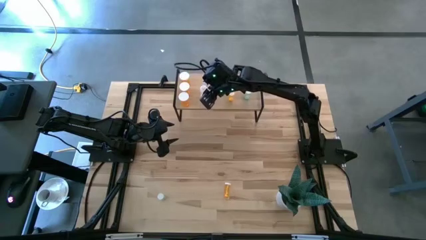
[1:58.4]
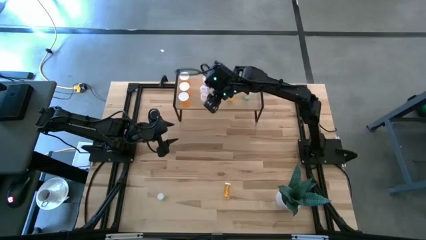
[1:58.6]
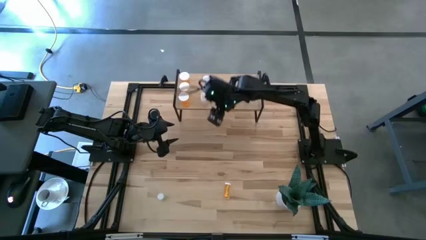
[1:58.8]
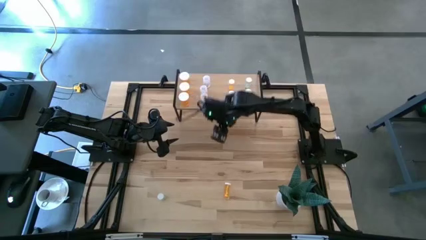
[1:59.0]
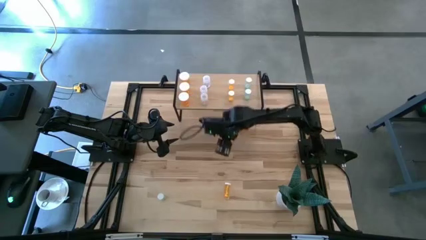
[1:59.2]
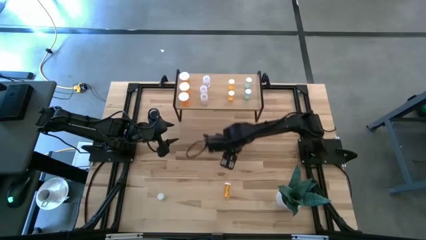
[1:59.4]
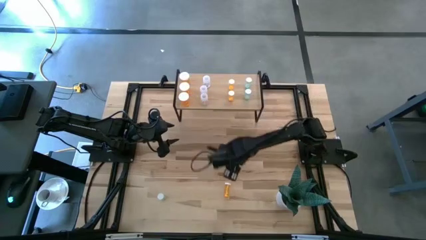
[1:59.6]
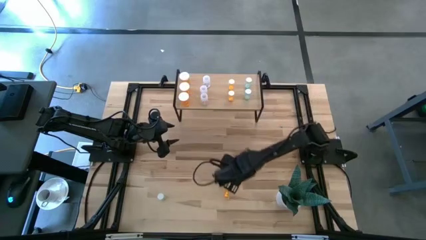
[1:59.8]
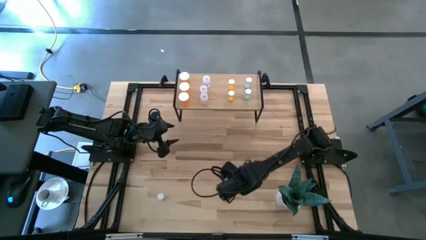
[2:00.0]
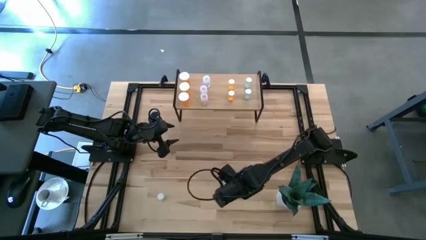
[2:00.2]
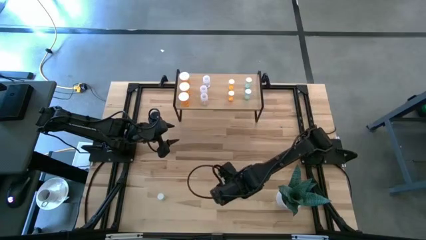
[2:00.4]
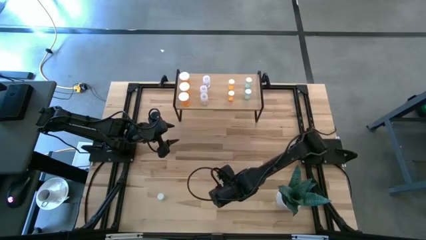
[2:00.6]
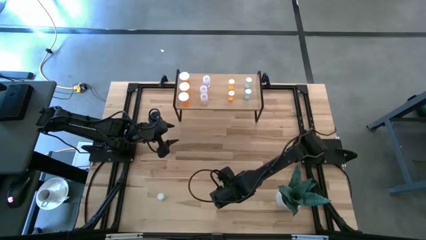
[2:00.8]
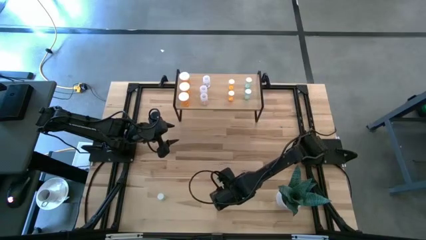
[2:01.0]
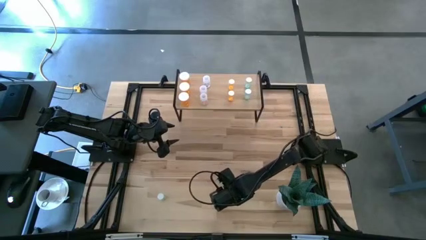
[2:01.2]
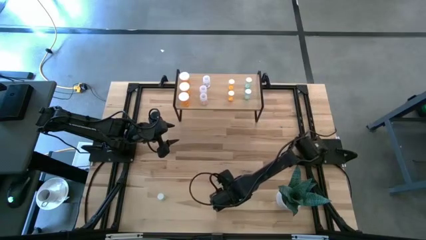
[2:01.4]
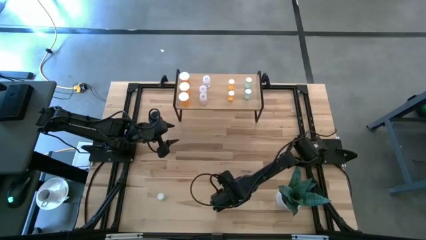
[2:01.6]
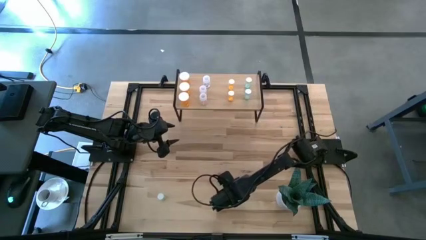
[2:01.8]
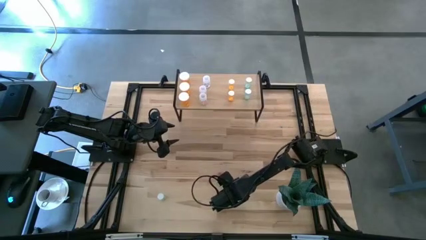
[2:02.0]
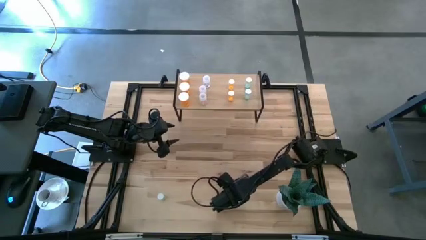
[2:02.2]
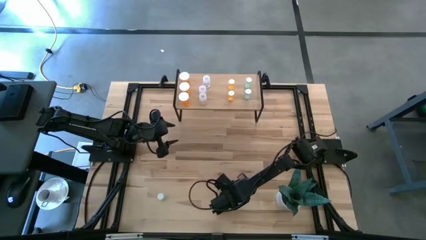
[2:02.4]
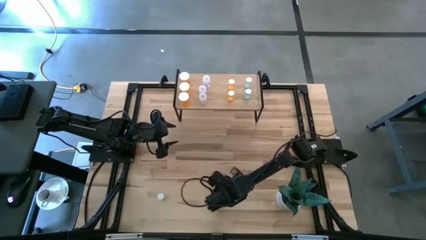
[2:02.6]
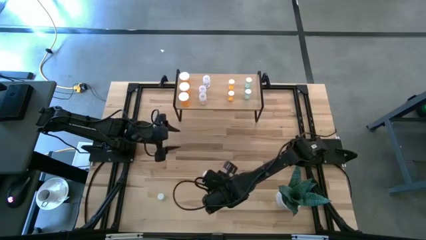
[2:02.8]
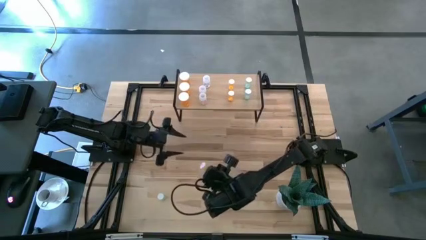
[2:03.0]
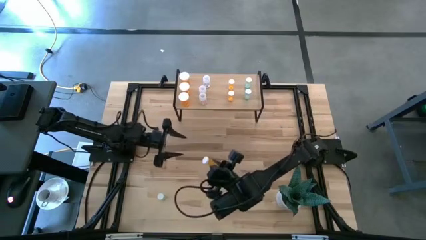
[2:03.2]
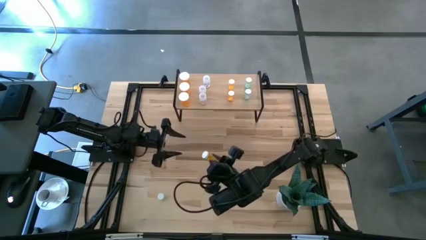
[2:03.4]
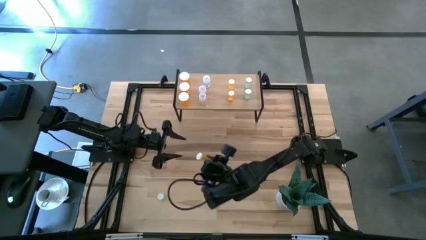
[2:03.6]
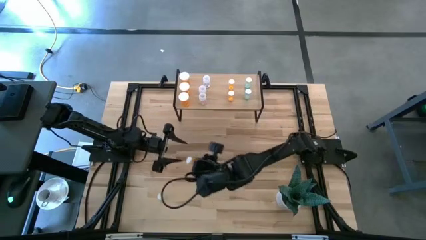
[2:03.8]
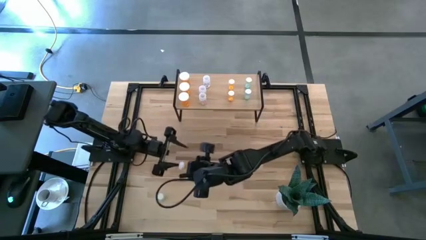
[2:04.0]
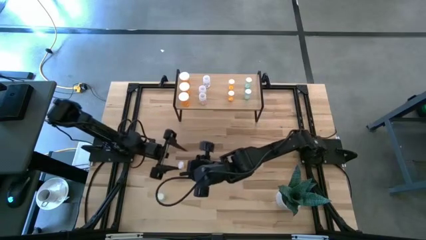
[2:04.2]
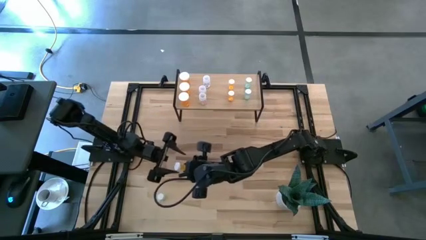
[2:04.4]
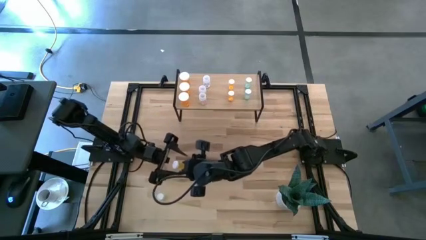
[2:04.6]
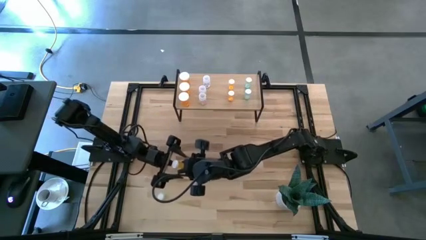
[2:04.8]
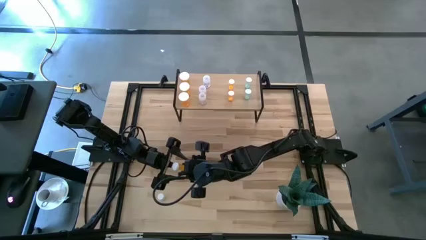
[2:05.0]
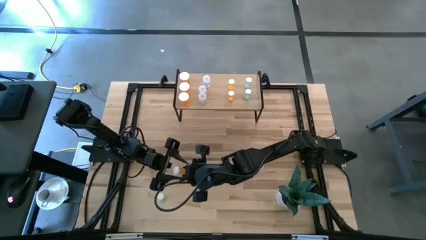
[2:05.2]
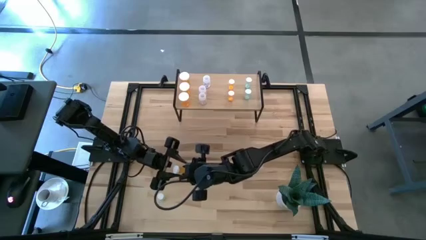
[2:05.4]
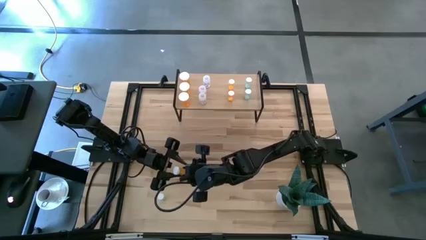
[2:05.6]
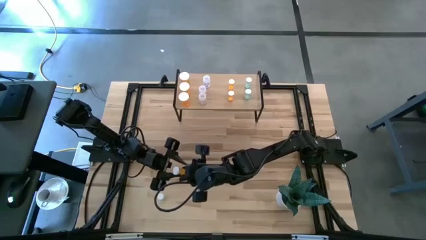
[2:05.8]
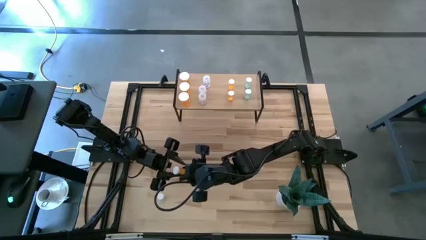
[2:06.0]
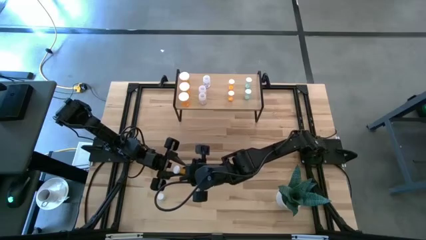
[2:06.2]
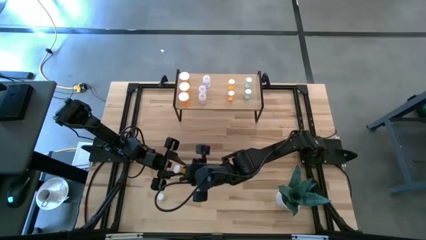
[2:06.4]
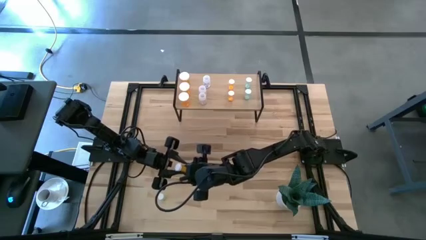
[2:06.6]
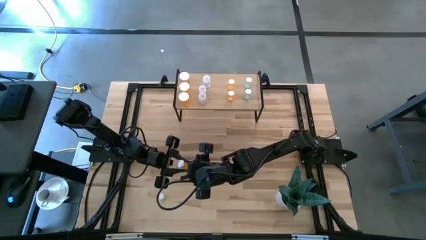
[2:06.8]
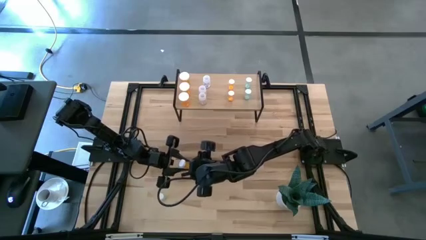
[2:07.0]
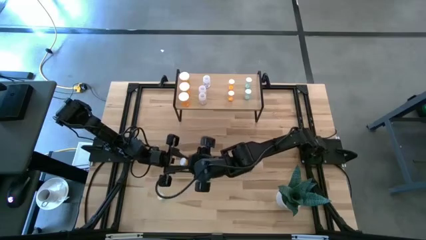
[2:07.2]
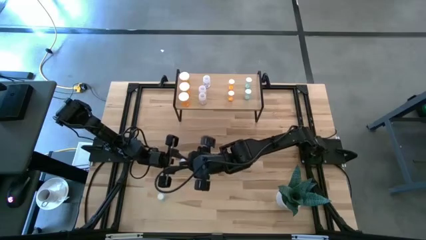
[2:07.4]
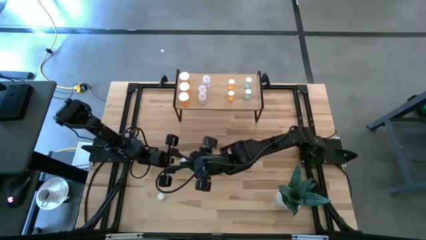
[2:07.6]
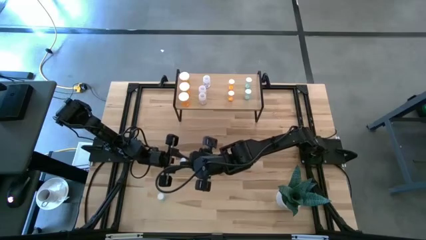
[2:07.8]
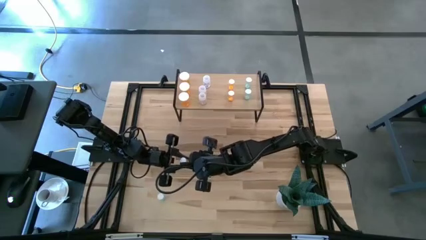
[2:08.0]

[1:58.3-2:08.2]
Task: Pick and place medicine bottles onto shelf by color
Put the small orange pill bottle on the shelf aligned with the other small orange pill bottle

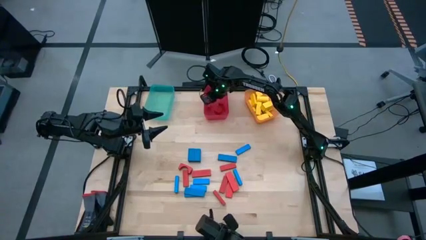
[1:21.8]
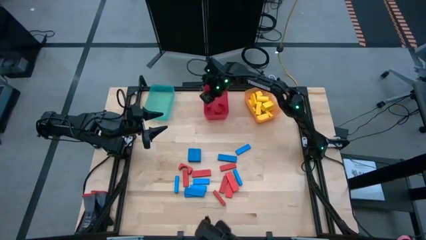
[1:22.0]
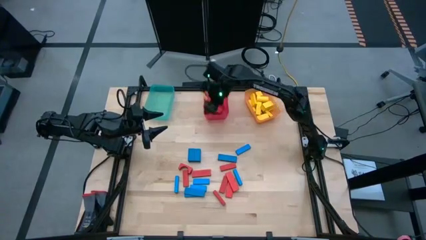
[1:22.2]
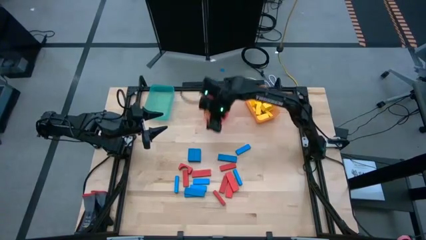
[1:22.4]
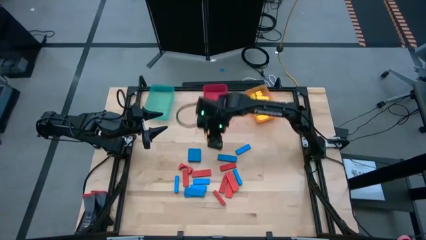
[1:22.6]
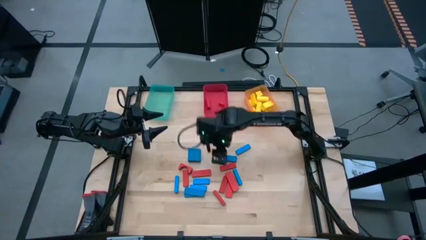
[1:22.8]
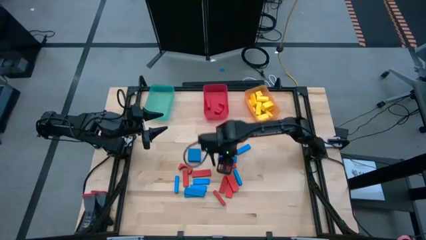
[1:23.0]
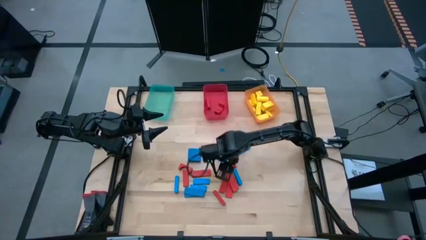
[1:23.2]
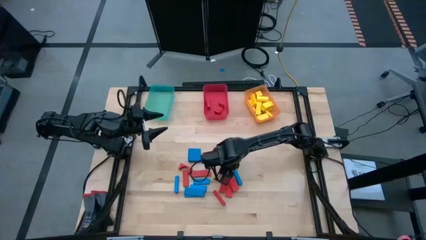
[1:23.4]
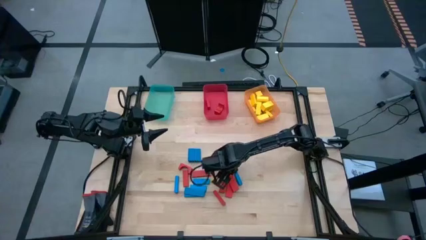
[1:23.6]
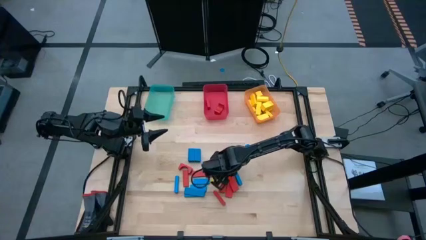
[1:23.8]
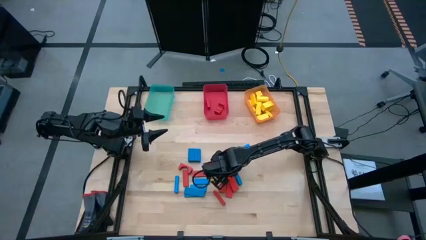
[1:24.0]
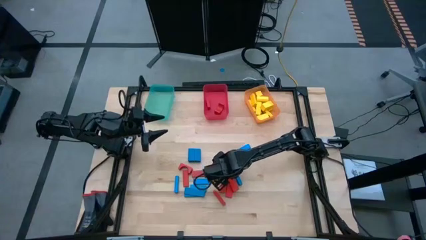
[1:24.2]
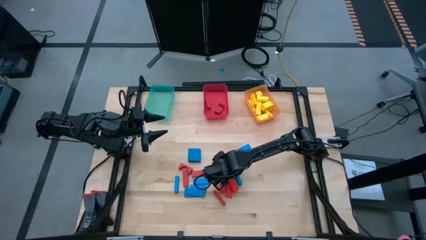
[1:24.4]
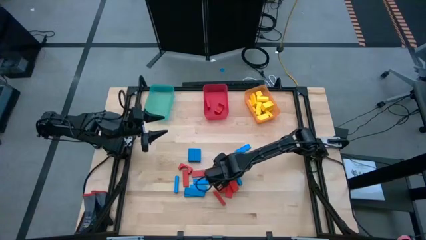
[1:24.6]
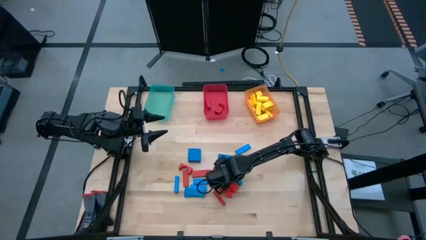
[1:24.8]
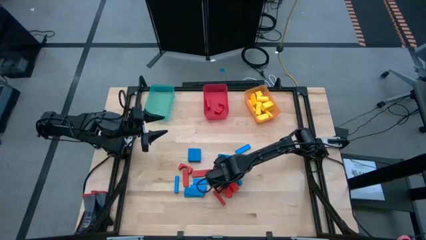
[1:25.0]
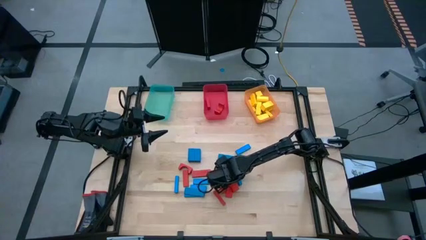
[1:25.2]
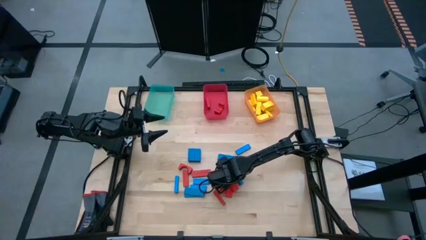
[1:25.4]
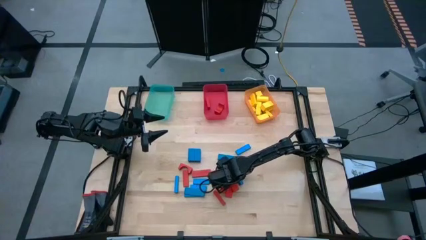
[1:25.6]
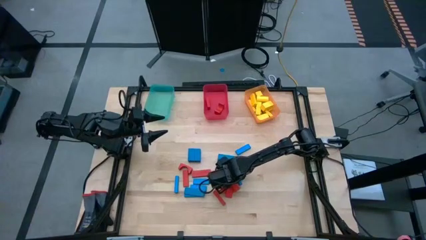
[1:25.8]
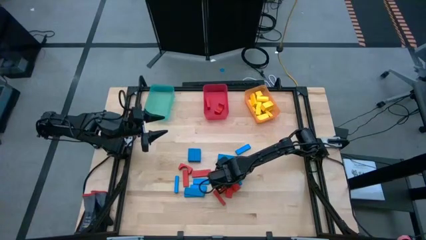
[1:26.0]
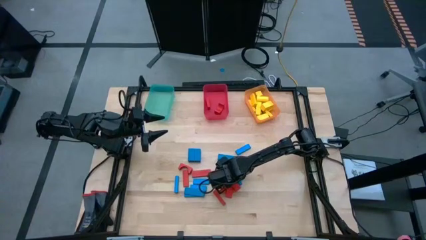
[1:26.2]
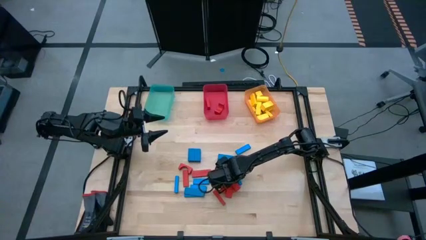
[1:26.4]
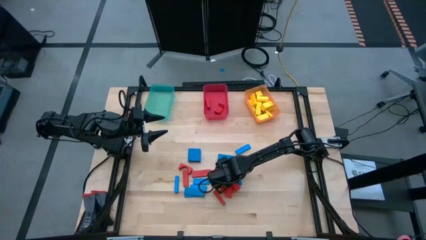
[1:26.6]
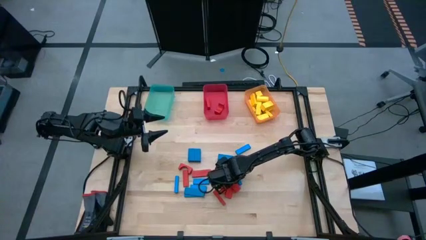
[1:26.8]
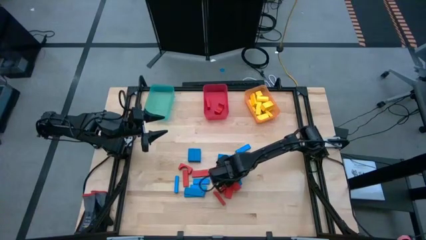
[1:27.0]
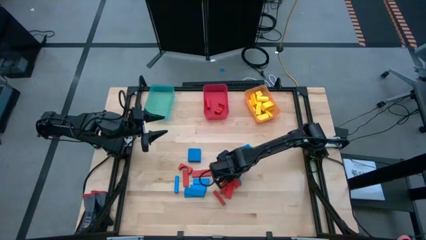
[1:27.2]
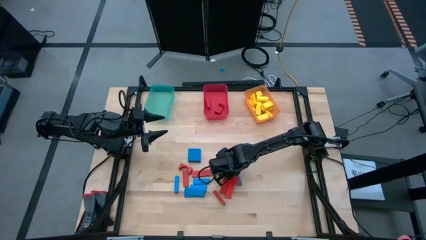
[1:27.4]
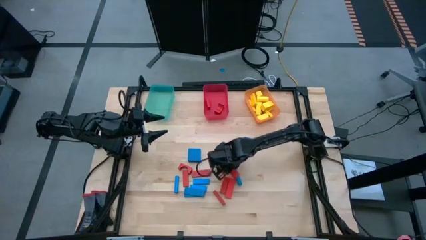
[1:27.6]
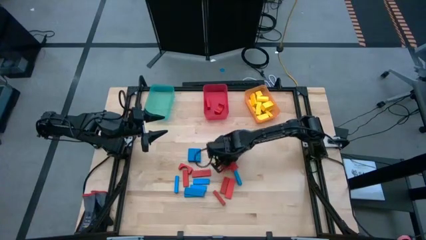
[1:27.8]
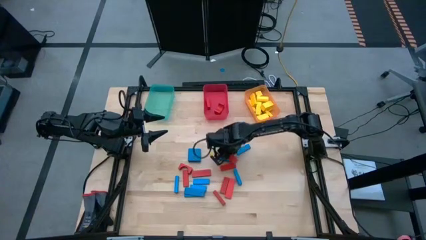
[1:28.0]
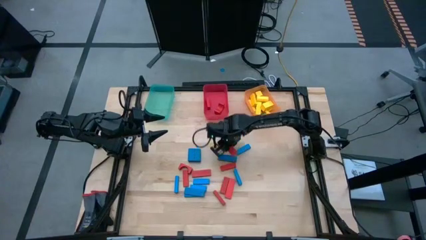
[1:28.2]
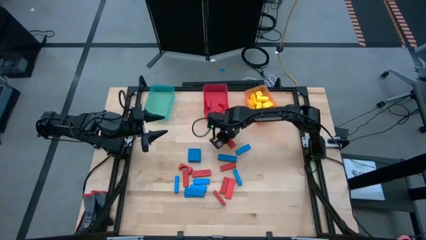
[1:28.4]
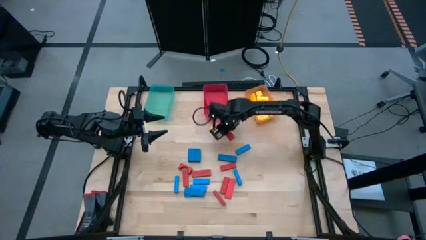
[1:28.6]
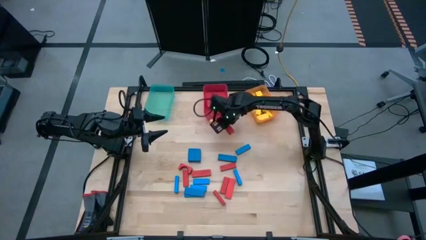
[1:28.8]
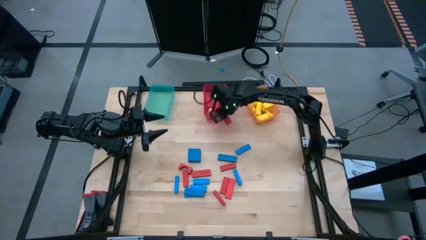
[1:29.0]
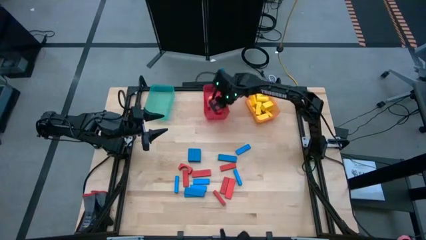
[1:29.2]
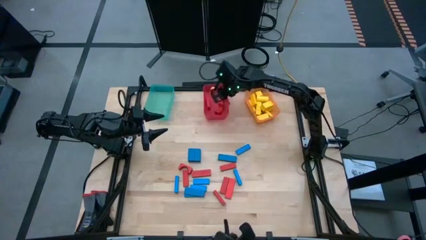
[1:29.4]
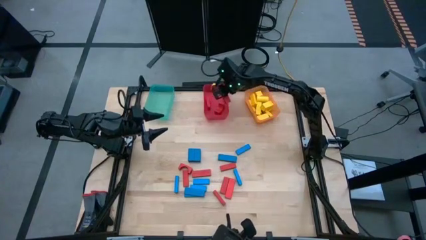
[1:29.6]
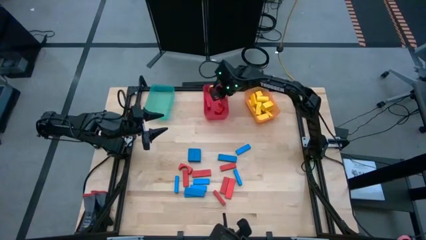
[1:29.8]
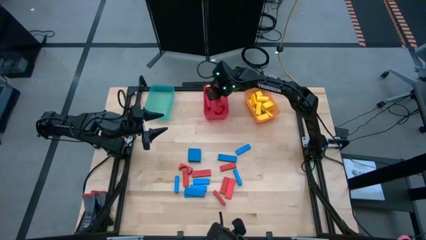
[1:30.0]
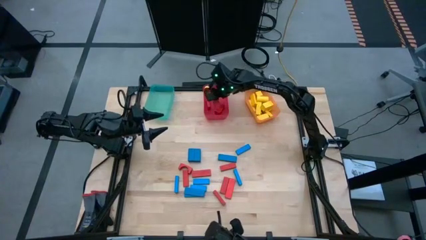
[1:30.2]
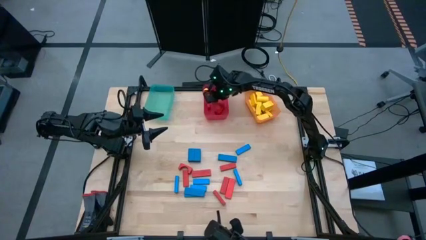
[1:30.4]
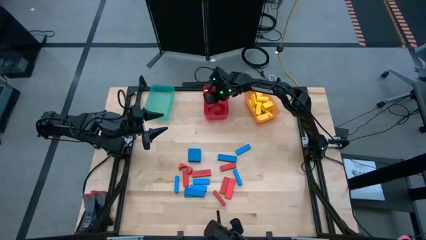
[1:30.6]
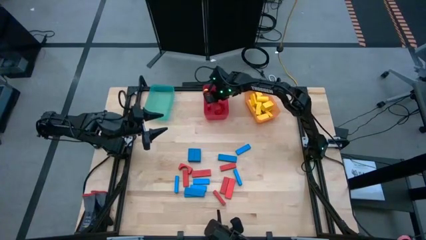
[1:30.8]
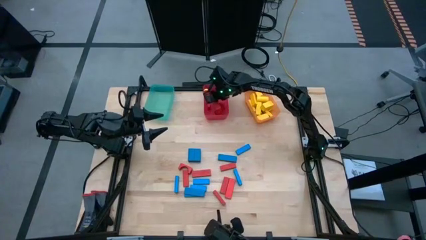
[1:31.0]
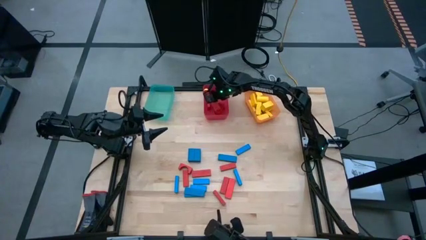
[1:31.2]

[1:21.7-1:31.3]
Task: Sort blocks
Put the red block into the red bin
